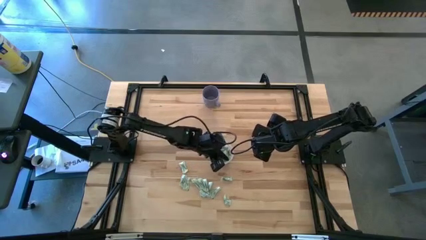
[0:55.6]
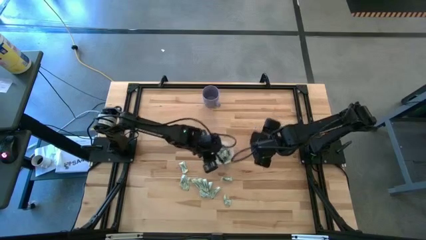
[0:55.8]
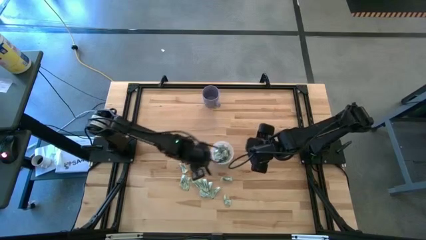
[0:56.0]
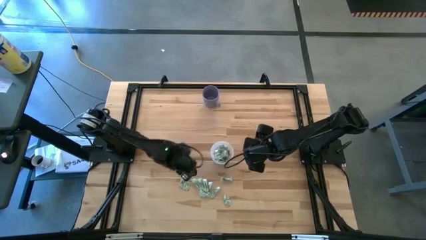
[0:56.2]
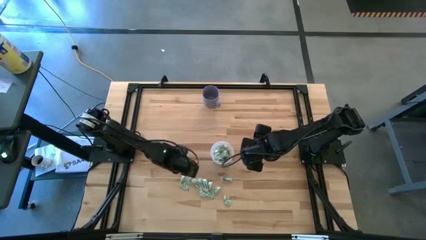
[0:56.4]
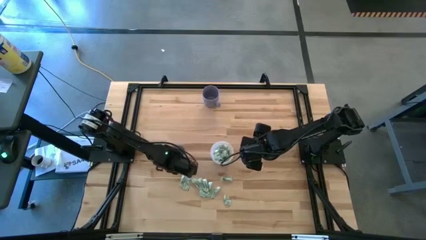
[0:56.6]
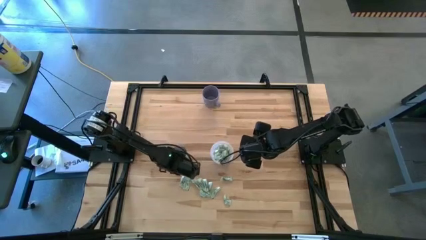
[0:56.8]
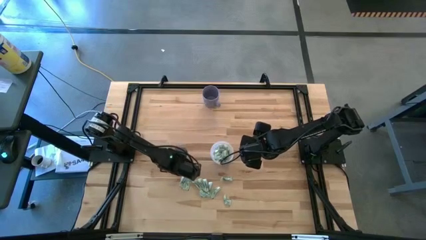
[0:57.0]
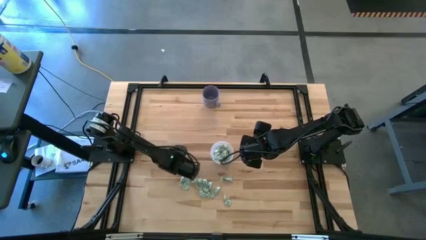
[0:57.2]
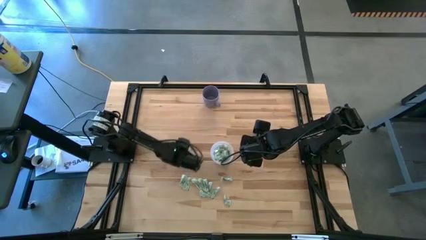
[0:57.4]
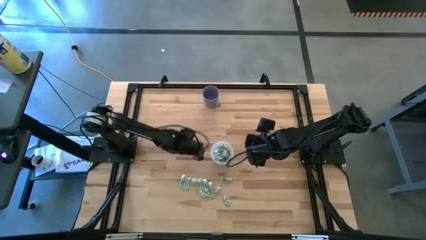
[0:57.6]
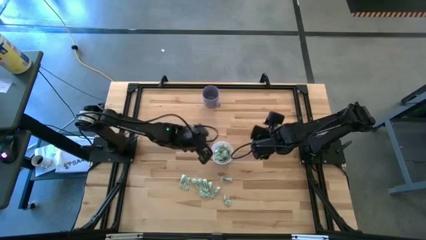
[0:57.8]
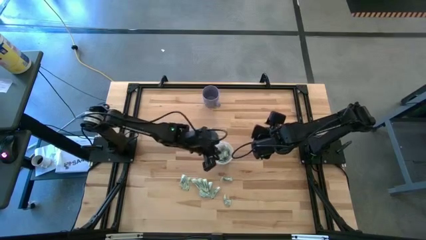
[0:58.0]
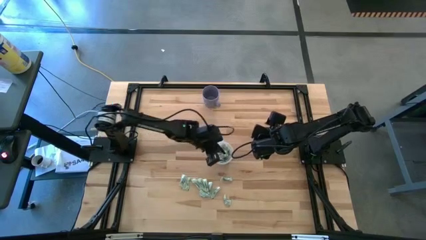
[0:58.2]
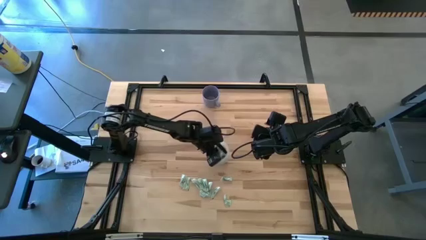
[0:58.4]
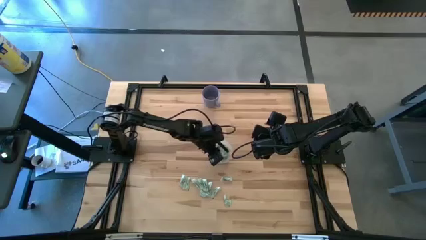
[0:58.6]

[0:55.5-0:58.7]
Task: Pick and place Stevia / Truvia into bins
Put the stevia packet into the transparent container

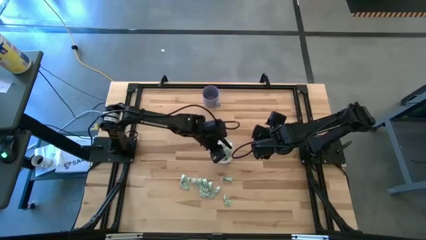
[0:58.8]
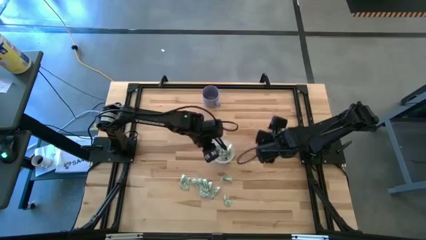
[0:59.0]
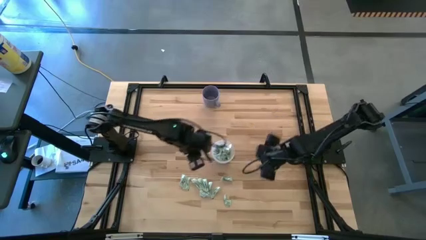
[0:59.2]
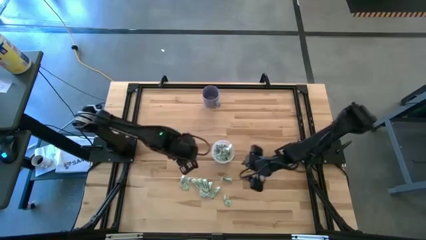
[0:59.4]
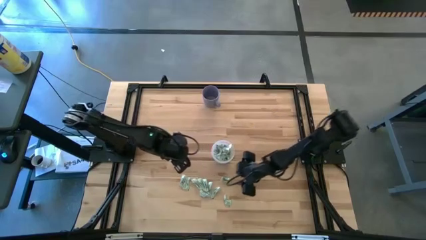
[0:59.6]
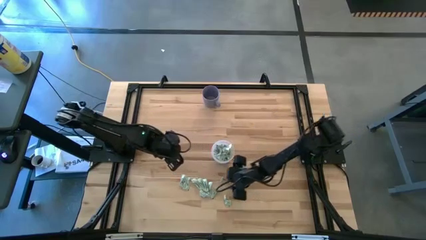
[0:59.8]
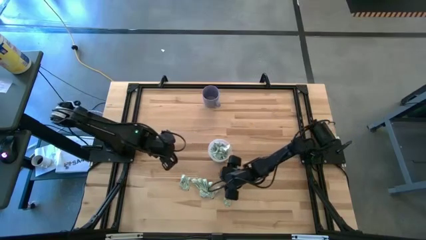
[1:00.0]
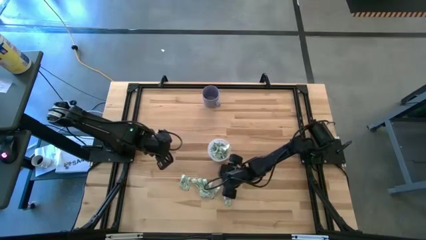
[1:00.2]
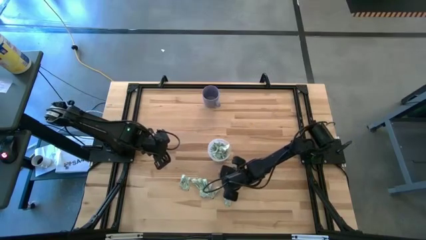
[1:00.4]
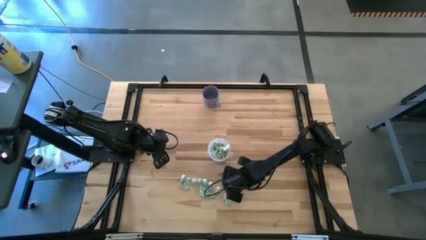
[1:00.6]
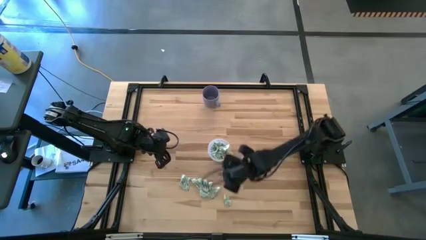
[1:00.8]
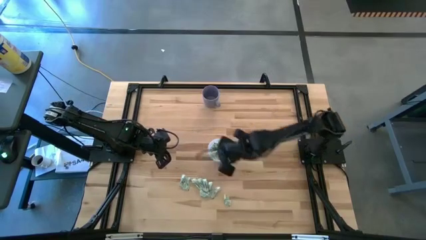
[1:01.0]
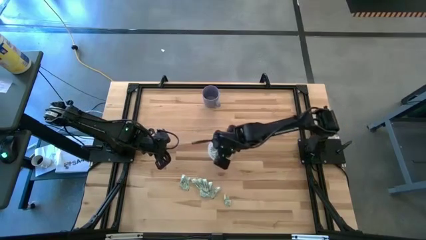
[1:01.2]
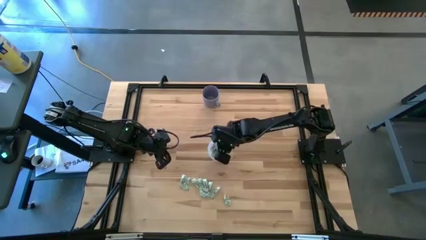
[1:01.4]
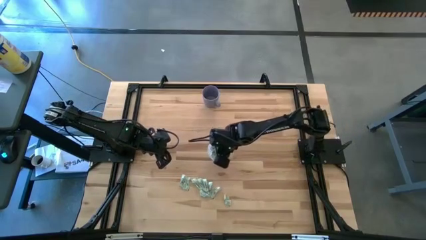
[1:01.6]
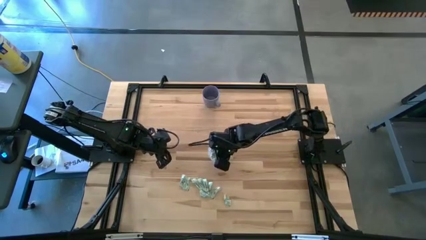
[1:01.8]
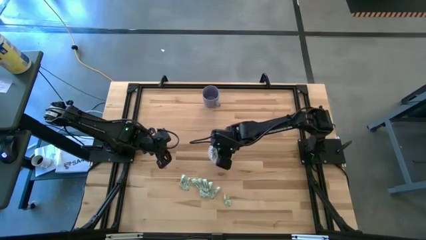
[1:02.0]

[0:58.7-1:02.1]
Put the stevia packet into the transparent container

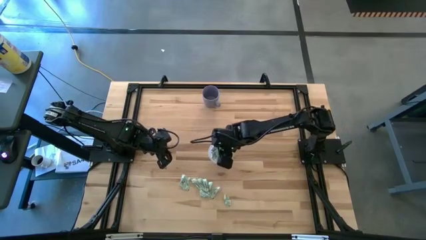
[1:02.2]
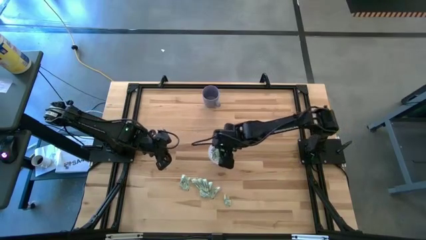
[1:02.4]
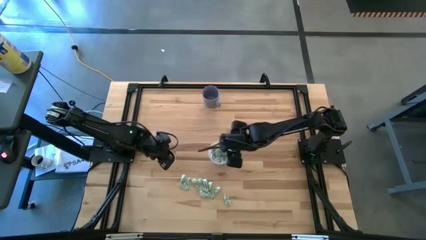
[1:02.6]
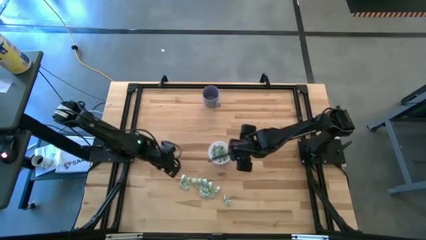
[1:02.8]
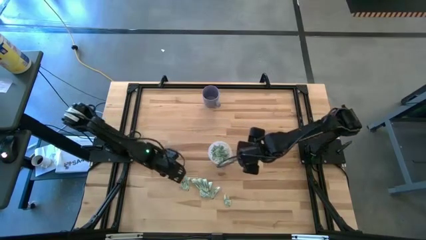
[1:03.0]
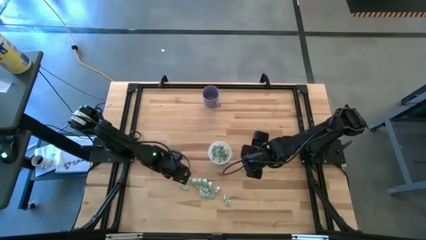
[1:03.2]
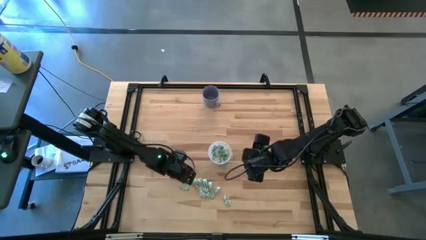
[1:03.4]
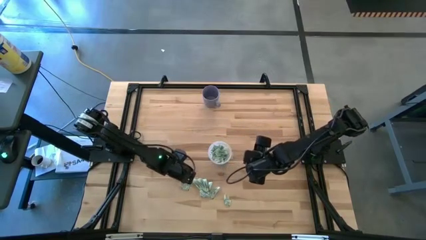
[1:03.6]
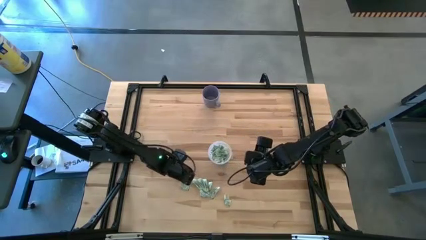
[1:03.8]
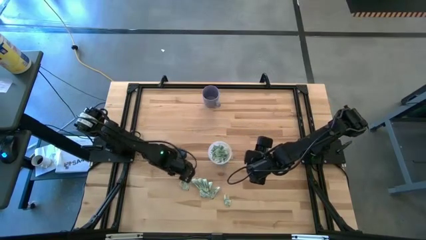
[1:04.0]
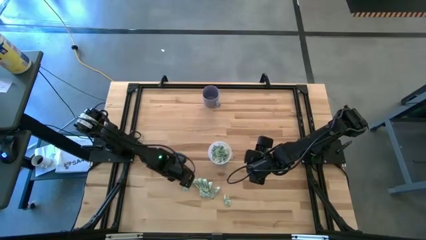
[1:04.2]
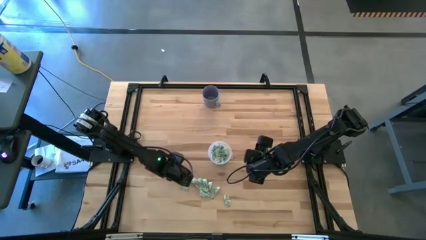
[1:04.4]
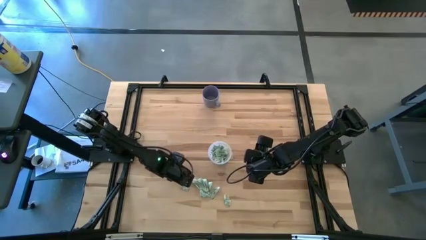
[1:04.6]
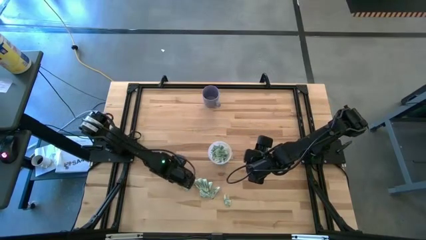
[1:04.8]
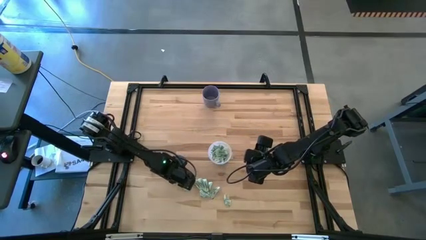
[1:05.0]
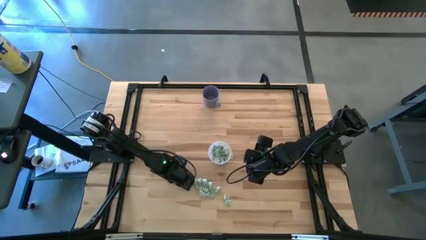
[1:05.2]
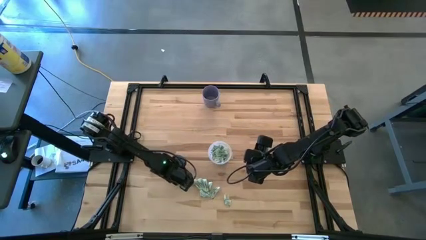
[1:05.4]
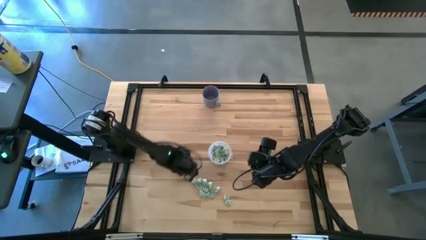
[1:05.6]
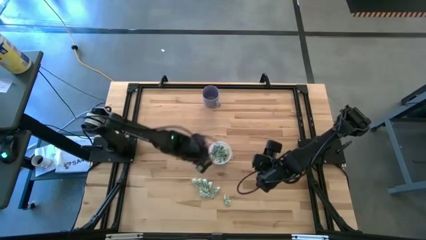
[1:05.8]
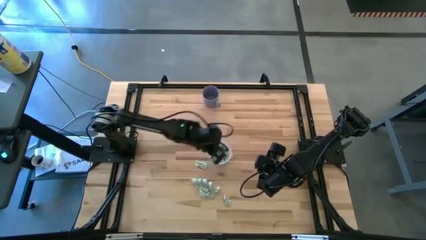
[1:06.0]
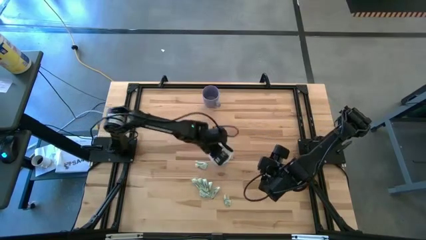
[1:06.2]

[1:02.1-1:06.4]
Put the stevia packet into the transparent container

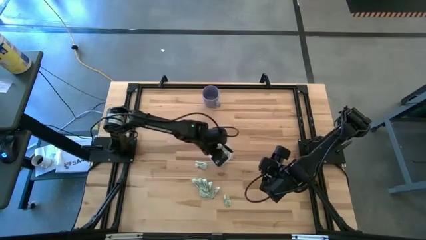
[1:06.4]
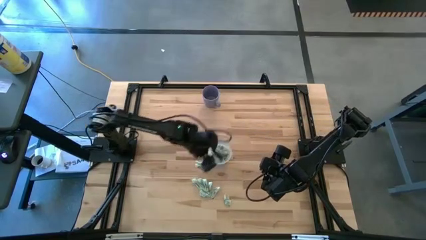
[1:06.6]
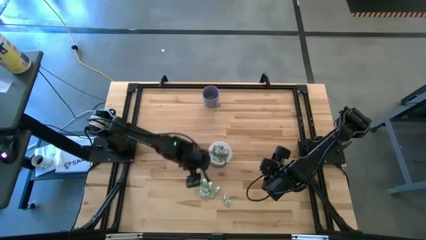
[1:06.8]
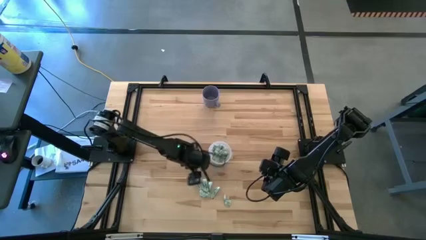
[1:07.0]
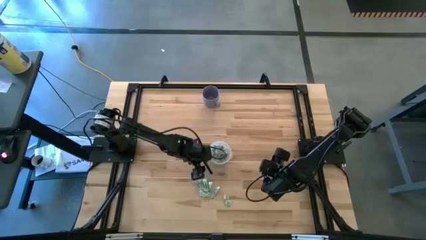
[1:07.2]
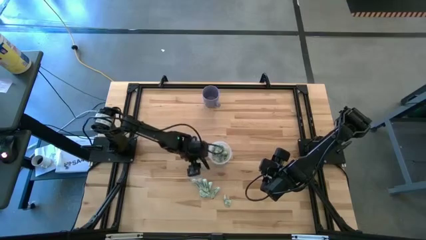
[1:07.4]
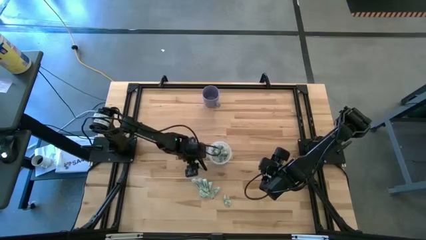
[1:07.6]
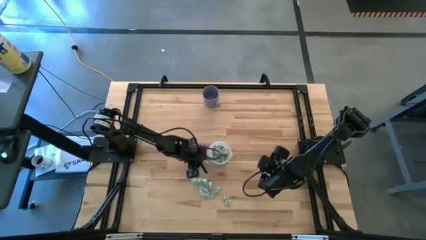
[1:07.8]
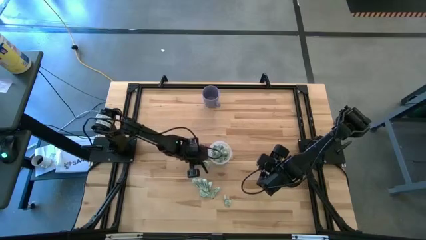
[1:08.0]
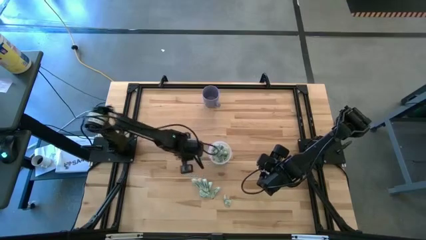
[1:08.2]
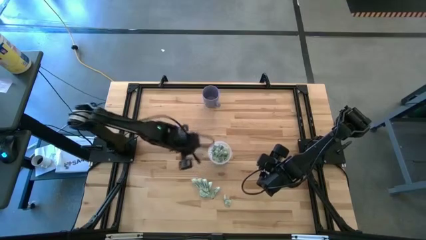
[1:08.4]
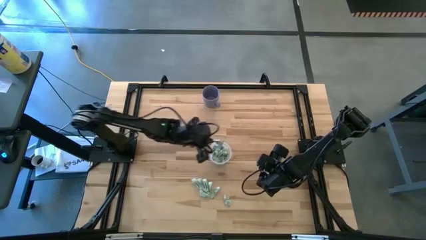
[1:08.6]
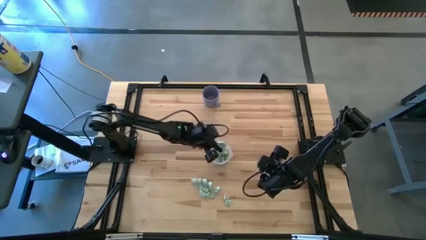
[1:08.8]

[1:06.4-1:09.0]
Put the stevia packet into the transparent container

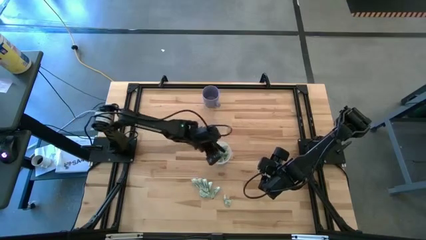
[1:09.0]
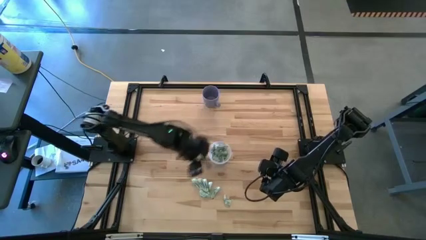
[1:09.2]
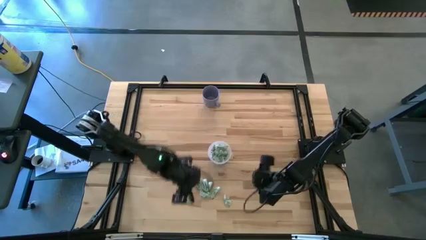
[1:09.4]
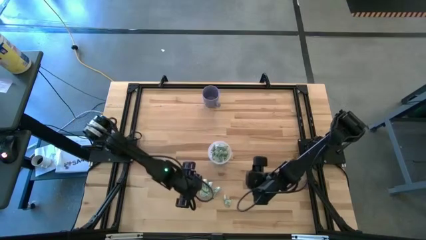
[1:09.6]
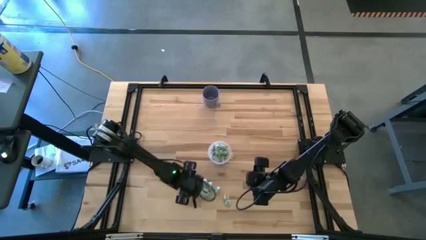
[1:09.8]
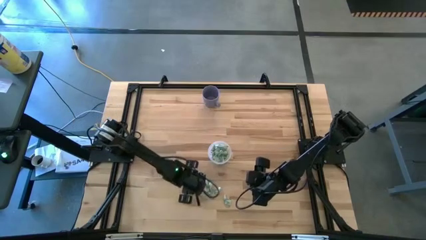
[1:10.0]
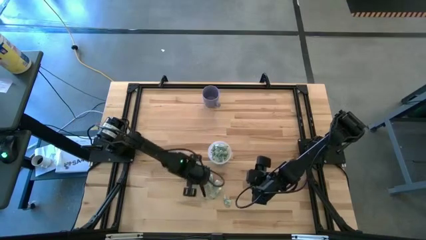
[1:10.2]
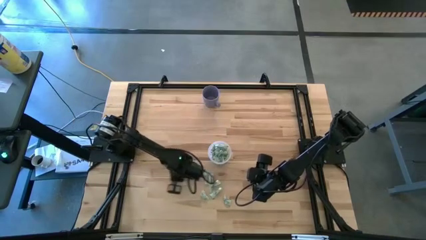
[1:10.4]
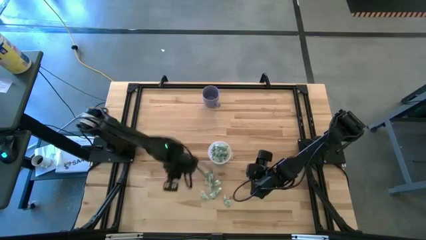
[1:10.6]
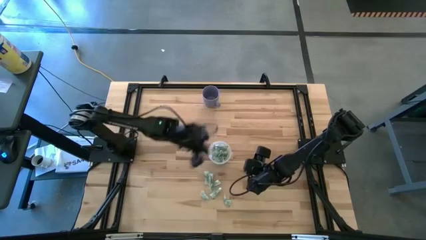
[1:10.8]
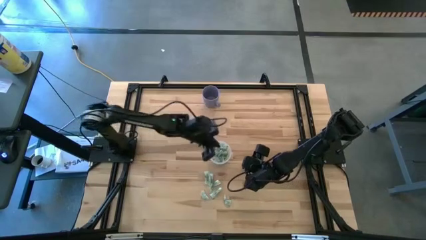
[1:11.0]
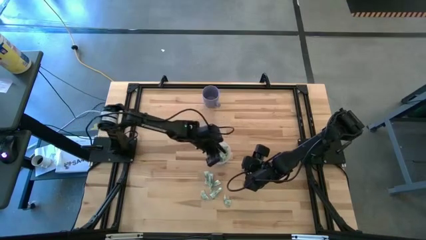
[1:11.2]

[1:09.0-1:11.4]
Put the stevia packet into the transparent container

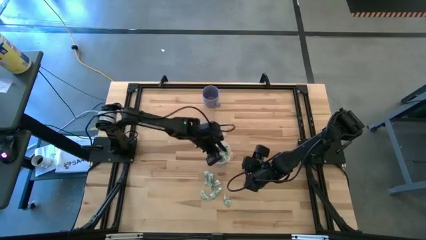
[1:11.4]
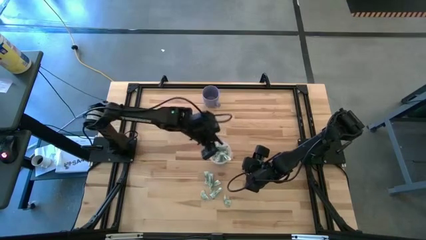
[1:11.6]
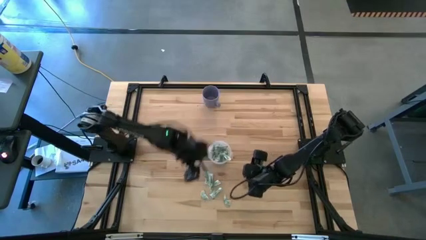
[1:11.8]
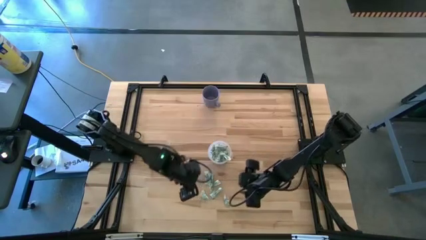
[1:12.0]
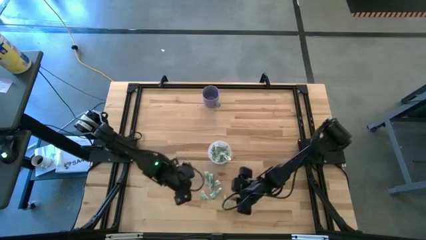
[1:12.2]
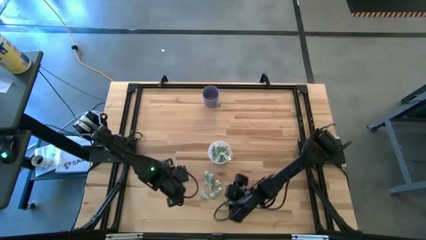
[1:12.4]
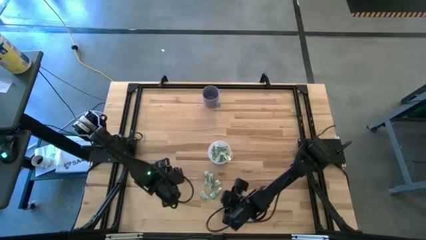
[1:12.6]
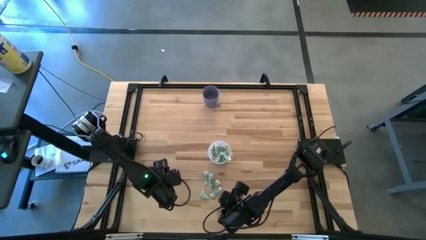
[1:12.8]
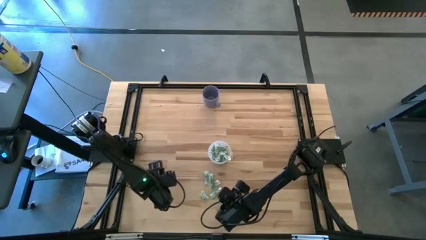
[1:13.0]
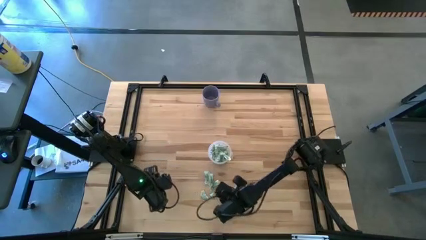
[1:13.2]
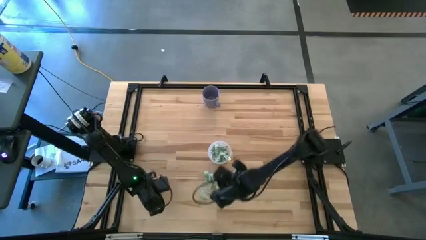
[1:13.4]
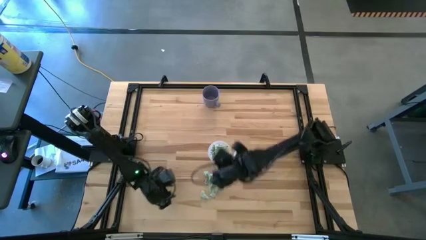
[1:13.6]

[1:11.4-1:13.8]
Put the stevia packet into the transparent container
